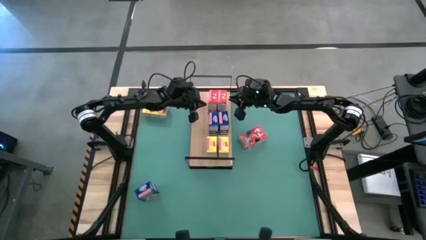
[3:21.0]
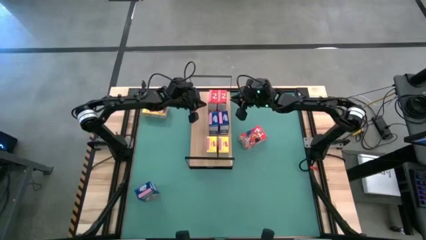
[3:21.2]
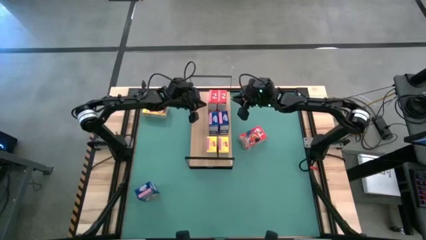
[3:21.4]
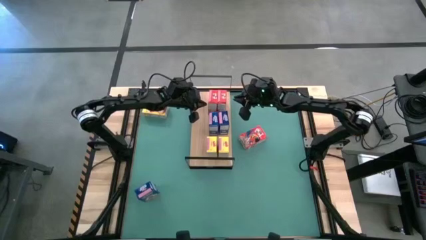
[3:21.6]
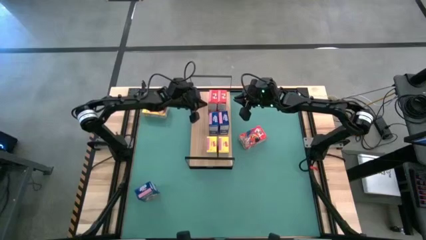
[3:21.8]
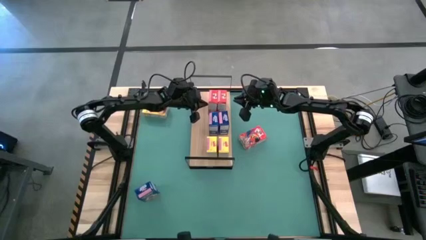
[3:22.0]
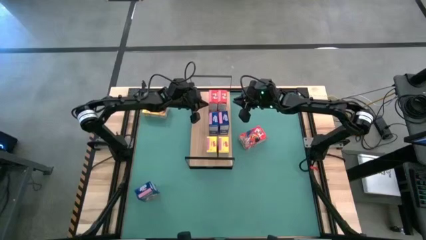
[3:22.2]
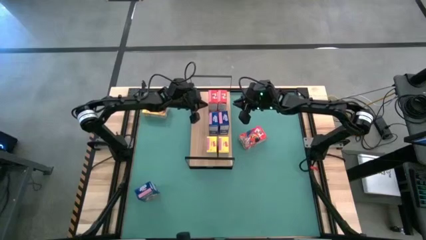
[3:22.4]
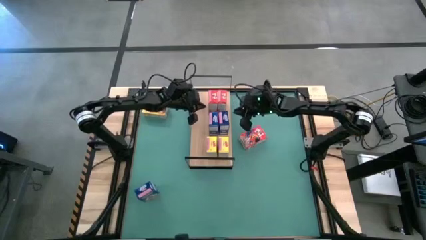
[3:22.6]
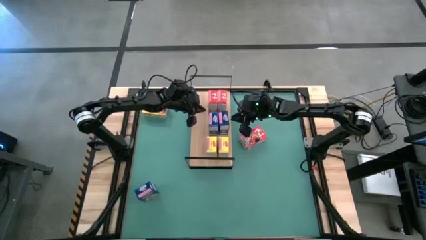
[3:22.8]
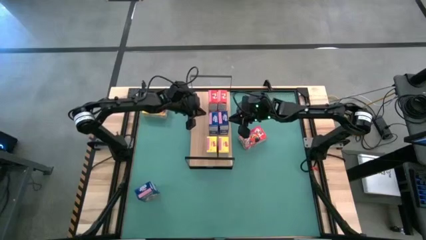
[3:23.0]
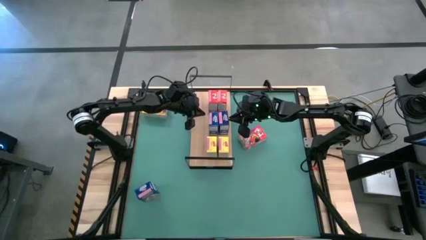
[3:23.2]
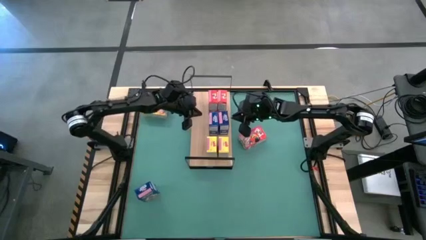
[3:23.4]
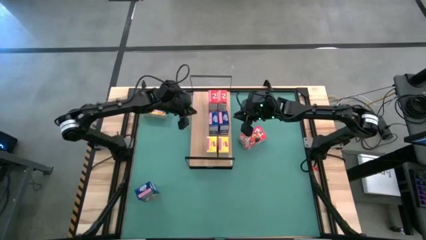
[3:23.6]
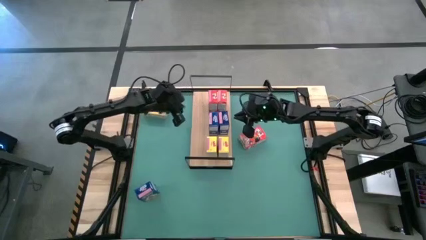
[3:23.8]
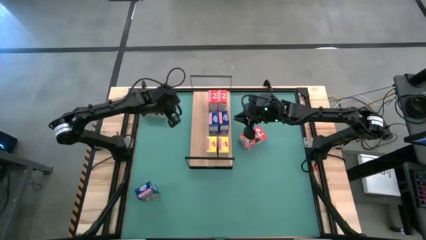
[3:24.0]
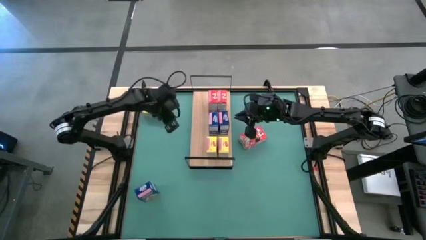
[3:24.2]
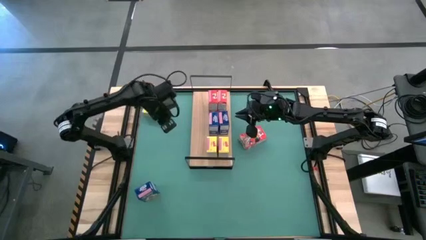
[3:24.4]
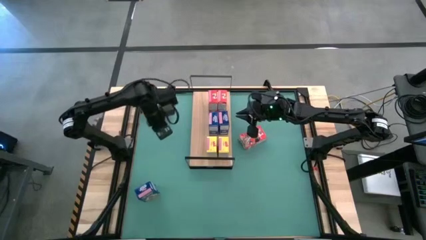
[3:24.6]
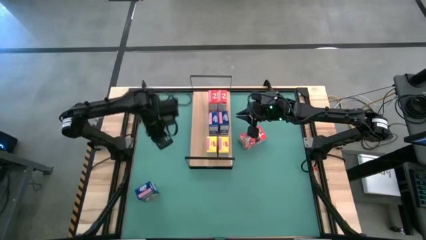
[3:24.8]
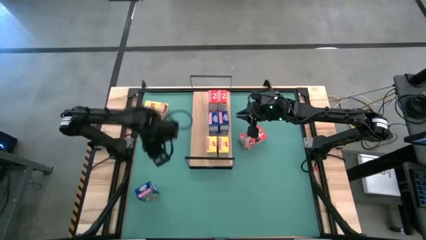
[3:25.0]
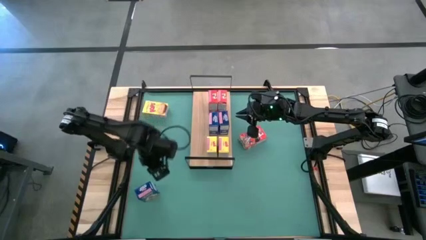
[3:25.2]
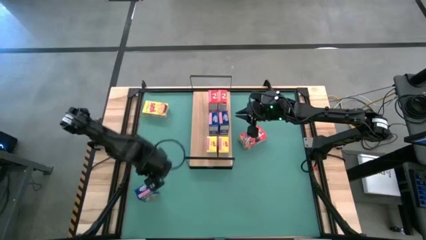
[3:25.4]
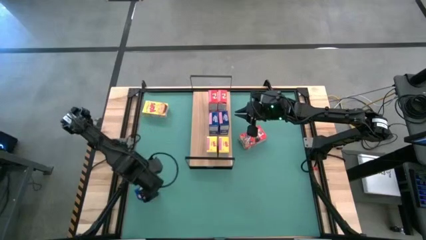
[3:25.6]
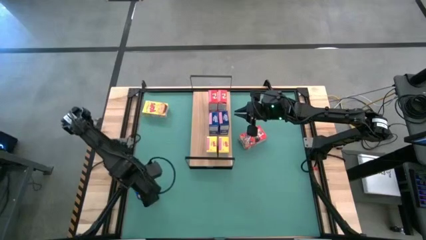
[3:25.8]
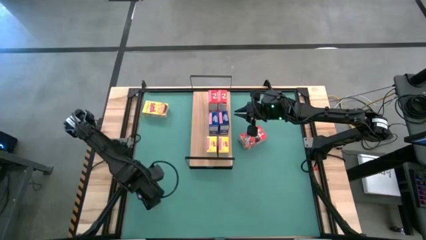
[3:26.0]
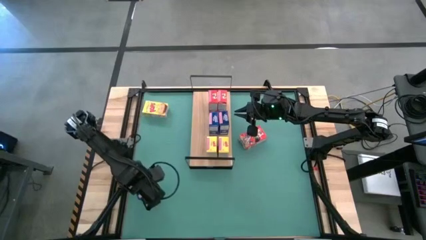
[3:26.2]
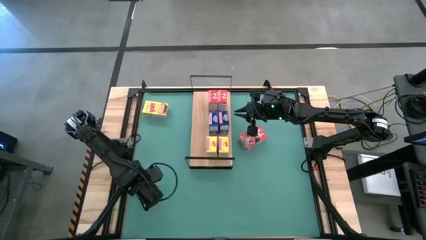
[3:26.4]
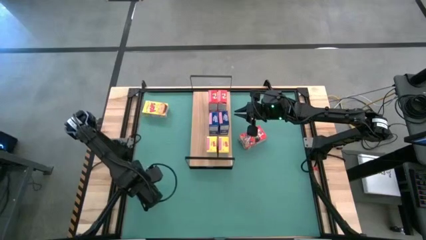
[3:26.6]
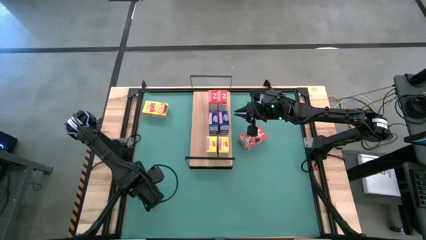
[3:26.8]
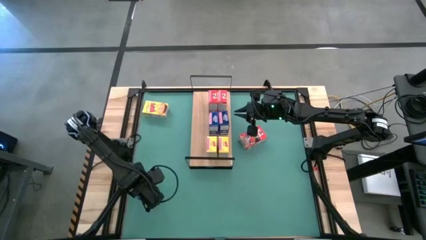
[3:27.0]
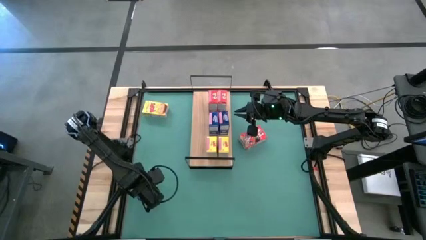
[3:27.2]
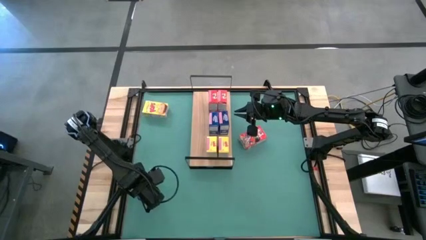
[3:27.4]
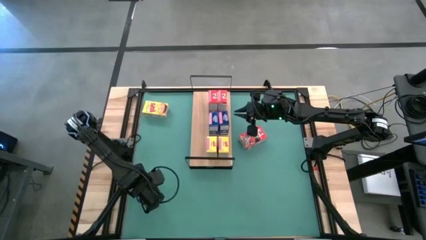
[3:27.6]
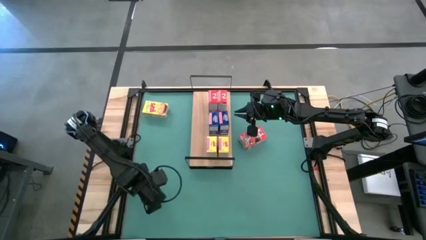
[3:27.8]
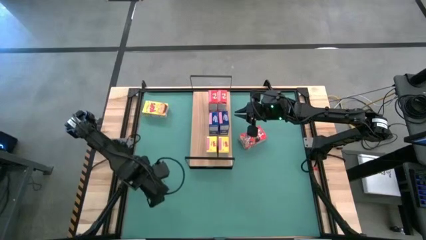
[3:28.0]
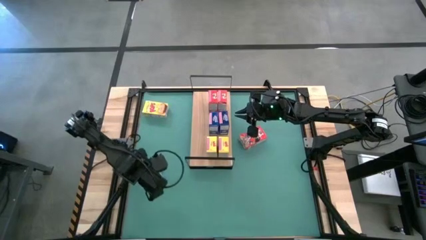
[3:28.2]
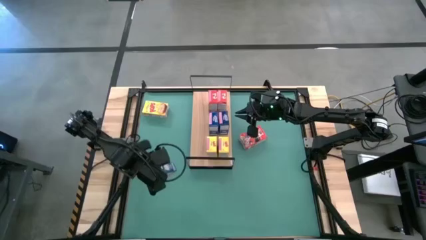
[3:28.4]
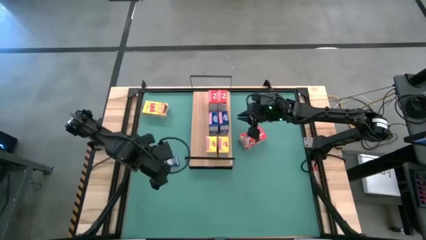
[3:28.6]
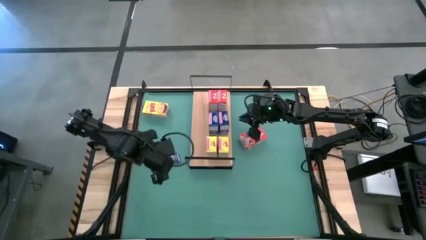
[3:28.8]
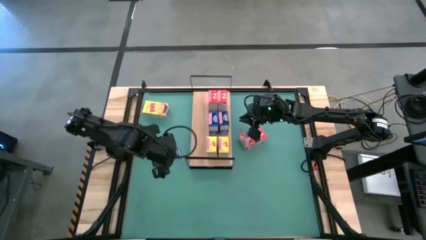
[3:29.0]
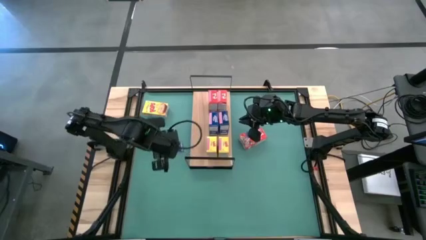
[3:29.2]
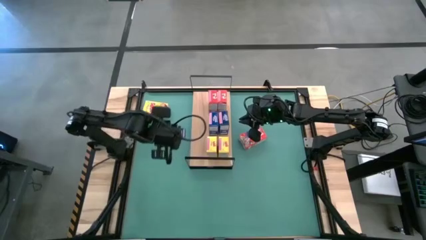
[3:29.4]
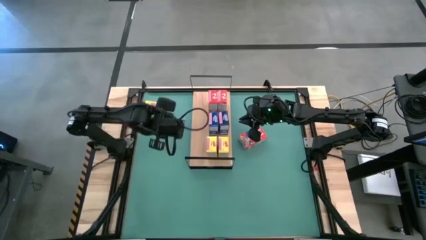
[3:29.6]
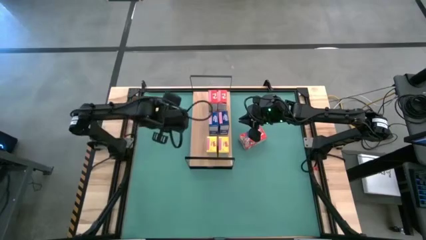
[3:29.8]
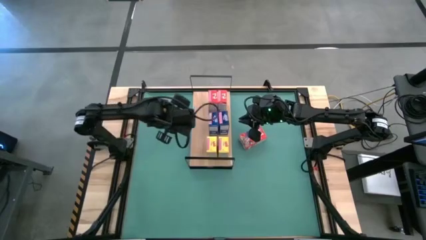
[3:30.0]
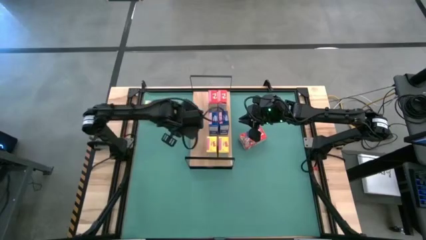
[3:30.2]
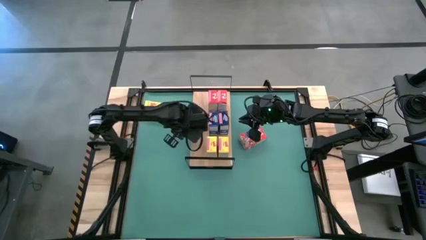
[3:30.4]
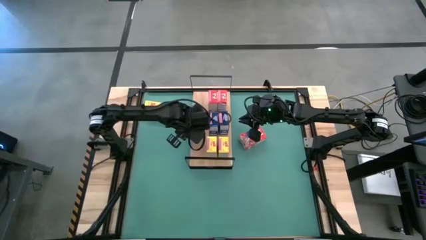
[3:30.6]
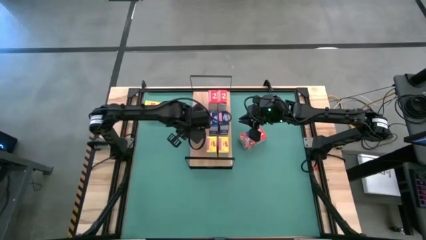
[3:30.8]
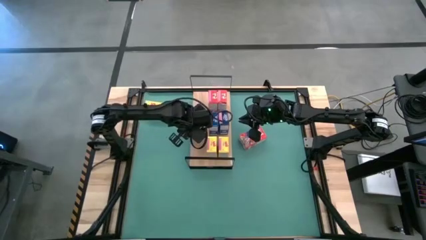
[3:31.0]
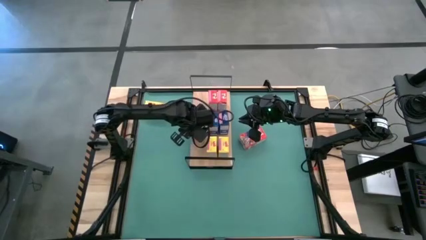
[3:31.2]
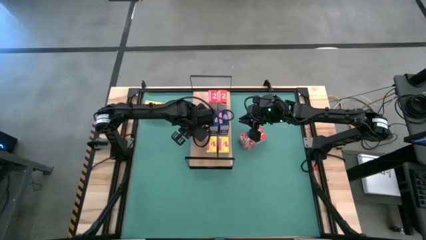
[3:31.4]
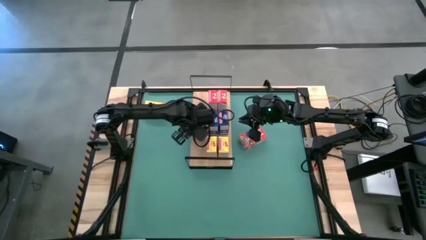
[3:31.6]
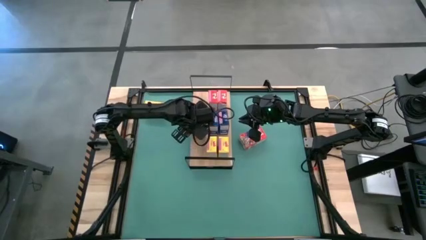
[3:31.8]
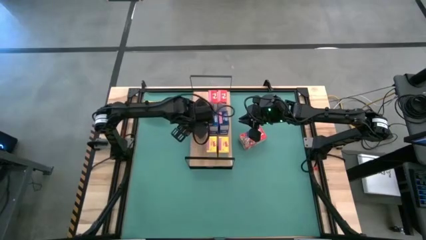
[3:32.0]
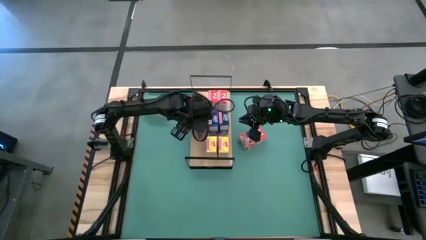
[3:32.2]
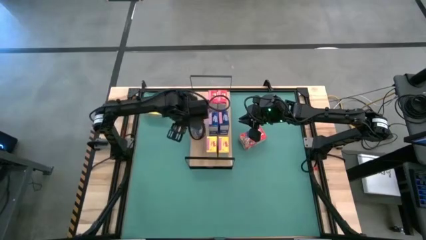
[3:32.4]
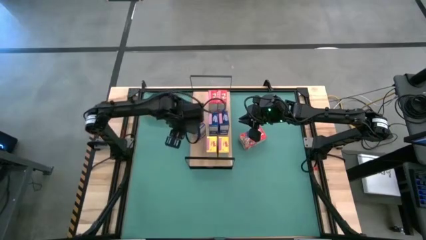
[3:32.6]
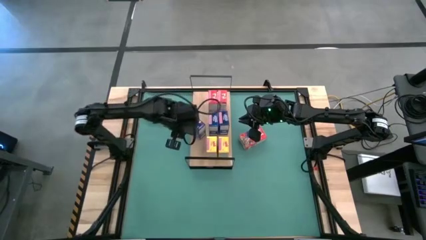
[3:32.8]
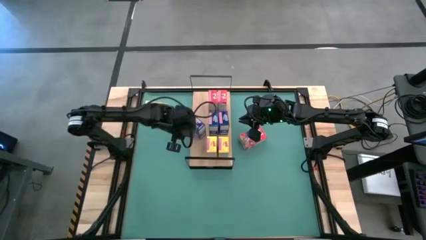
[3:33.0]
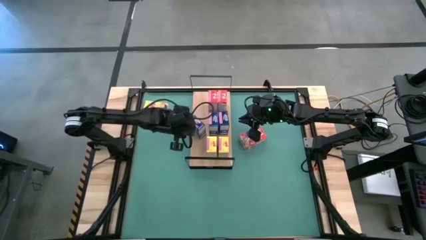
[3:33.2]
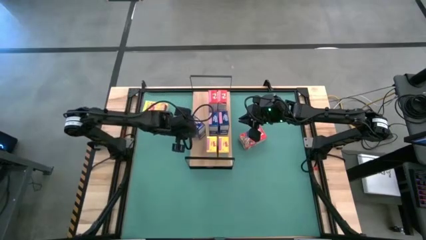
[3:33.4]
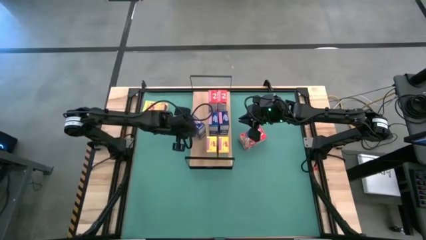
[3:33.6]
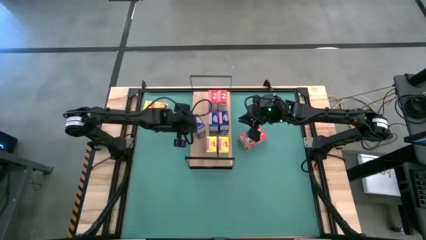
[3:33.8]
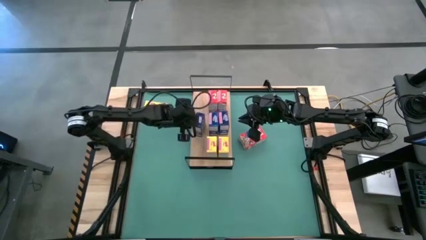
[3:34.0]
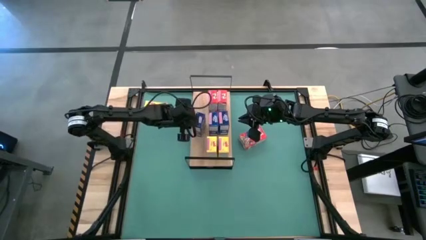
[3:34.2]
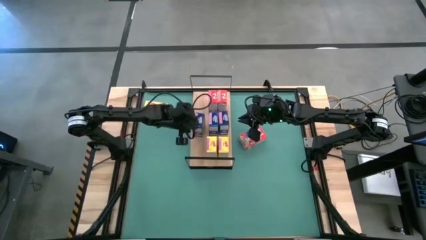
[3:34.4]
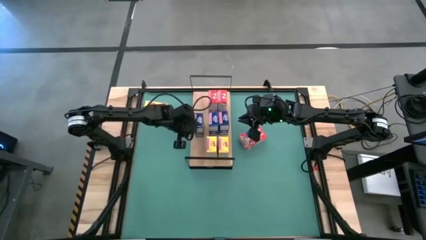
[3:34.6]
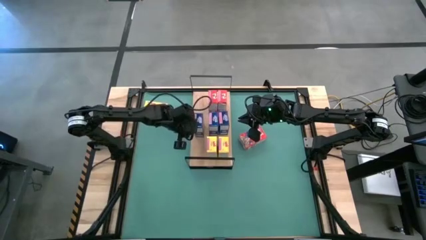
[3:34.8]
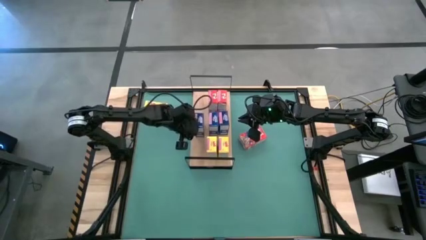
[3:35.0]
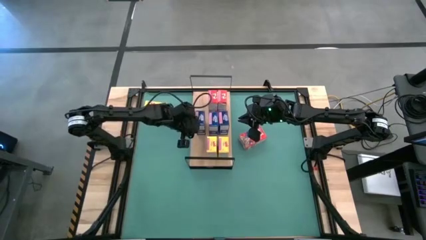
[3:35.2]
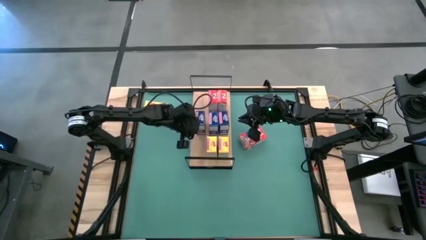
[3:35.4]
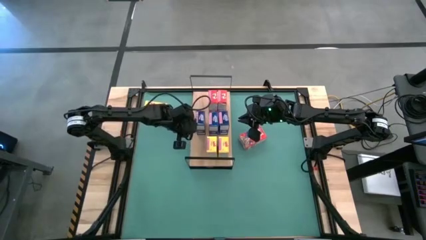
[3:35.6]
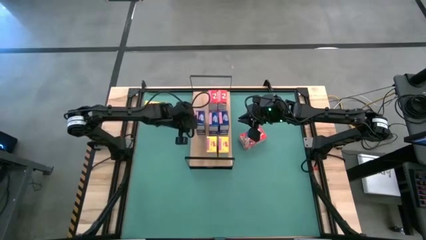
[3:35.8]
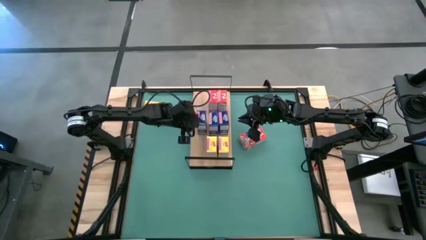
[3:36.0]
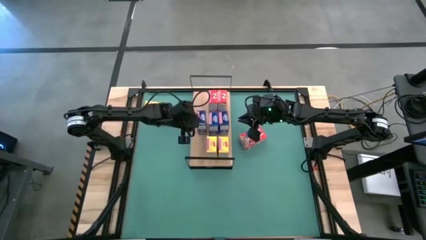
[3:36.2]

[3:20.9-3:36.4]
Task: Stack cereal on shelf
Put the blue cereal box on the shelf aligned with the other blue cereal box
